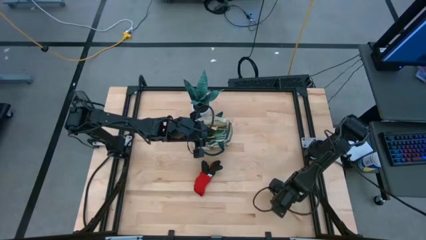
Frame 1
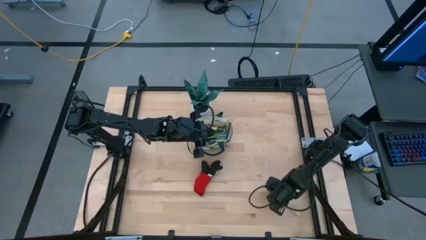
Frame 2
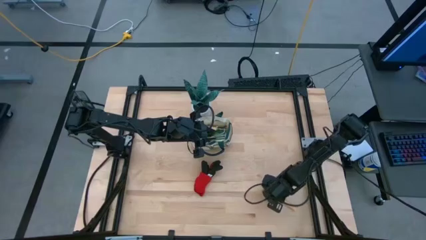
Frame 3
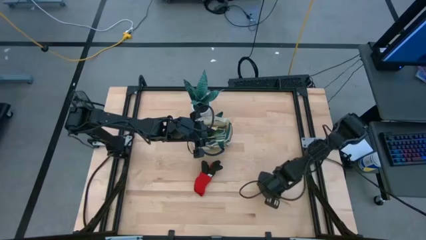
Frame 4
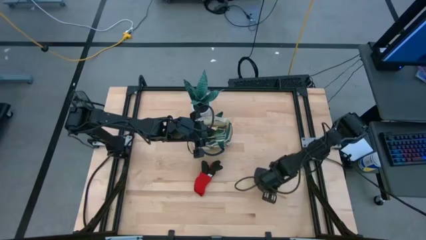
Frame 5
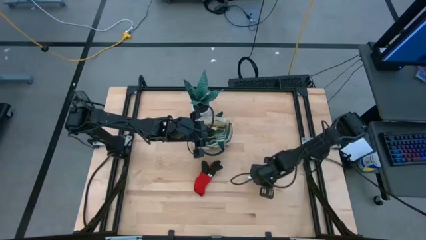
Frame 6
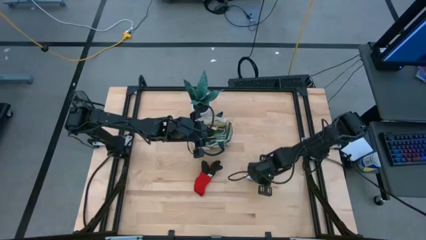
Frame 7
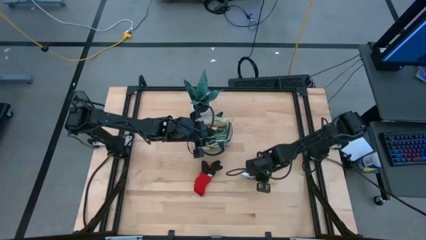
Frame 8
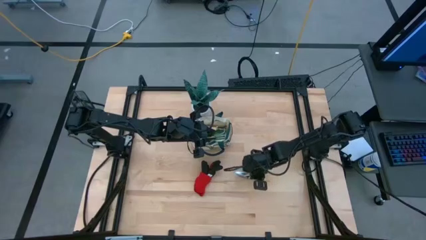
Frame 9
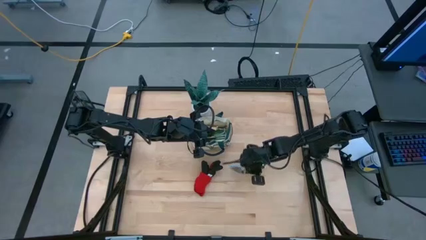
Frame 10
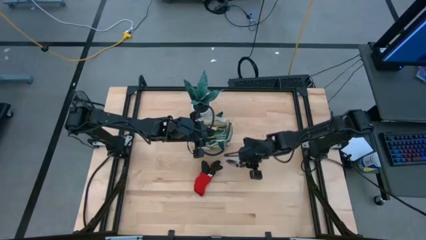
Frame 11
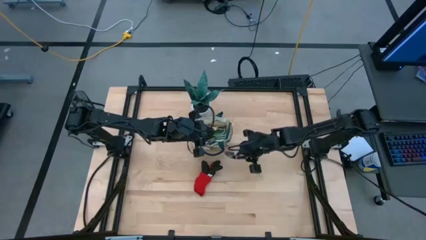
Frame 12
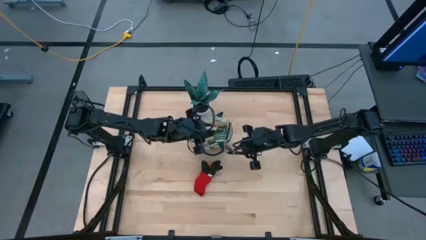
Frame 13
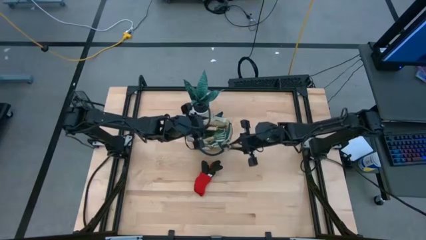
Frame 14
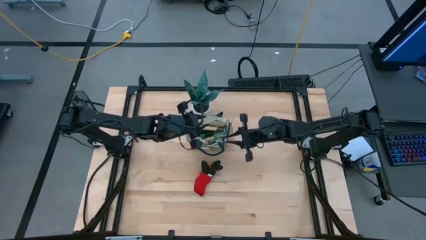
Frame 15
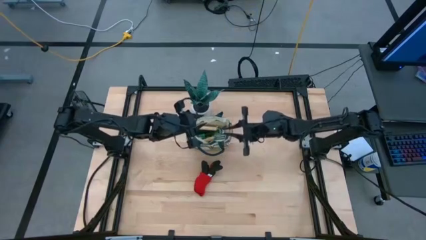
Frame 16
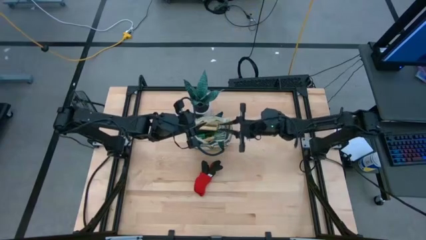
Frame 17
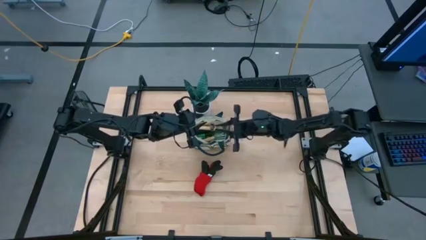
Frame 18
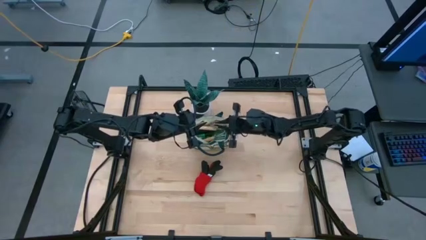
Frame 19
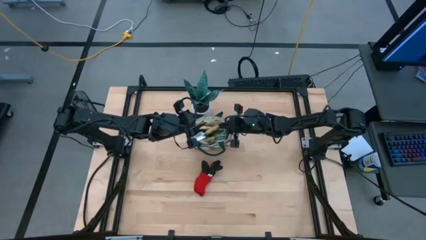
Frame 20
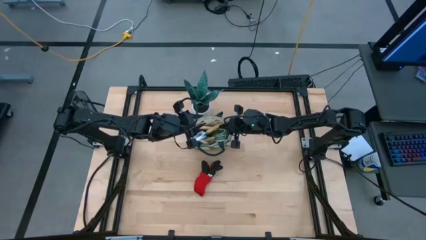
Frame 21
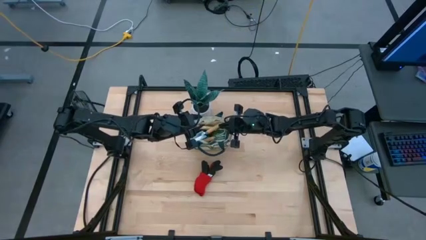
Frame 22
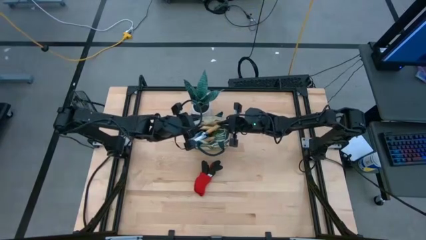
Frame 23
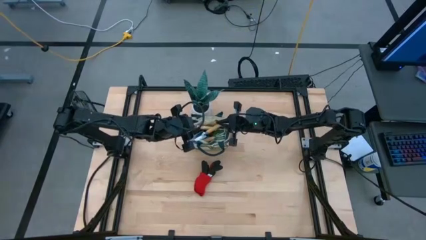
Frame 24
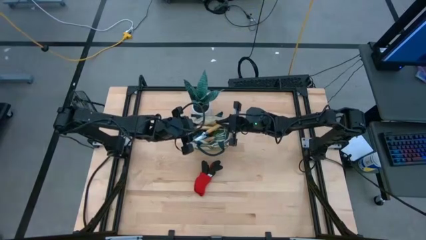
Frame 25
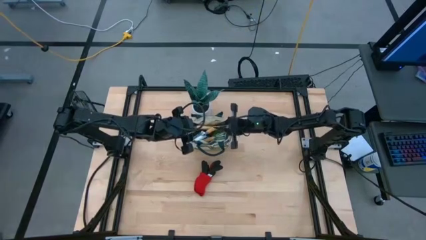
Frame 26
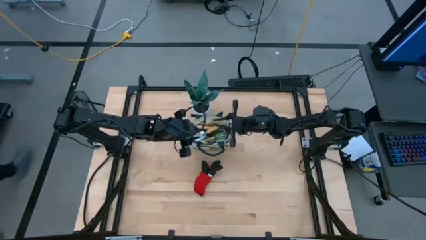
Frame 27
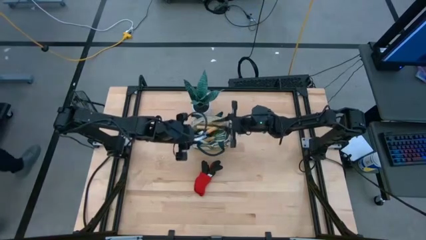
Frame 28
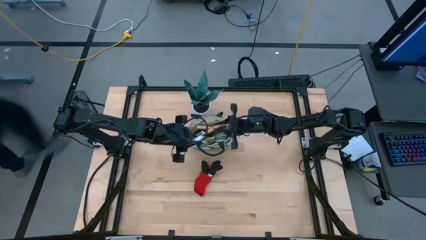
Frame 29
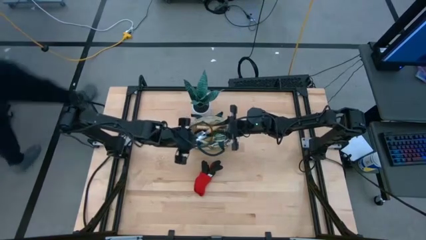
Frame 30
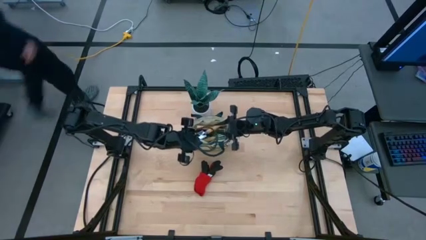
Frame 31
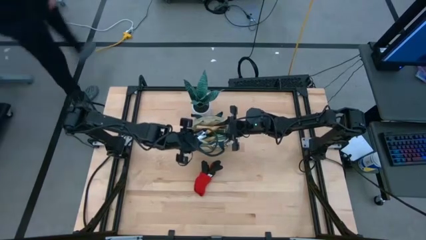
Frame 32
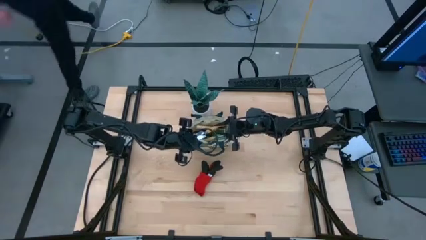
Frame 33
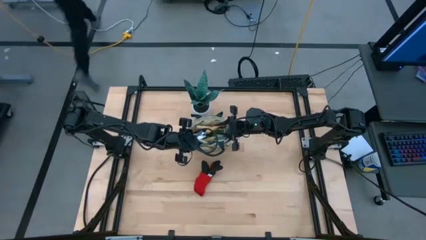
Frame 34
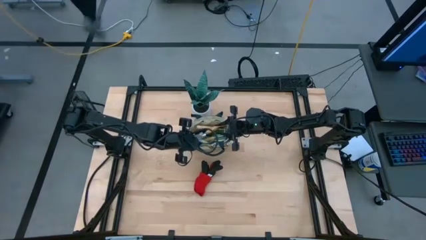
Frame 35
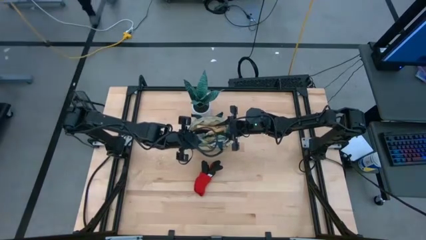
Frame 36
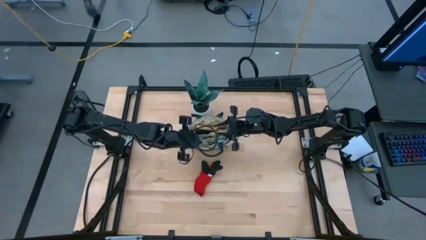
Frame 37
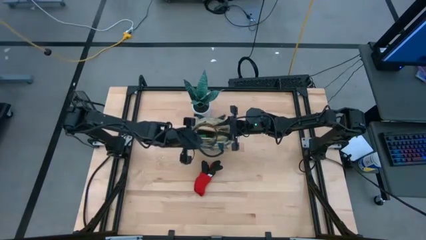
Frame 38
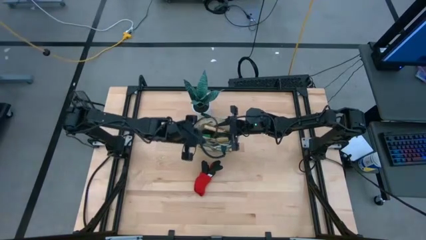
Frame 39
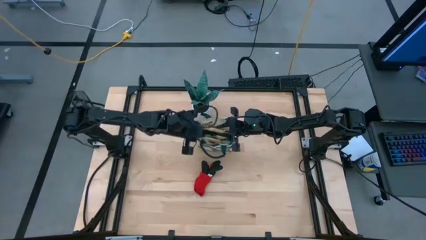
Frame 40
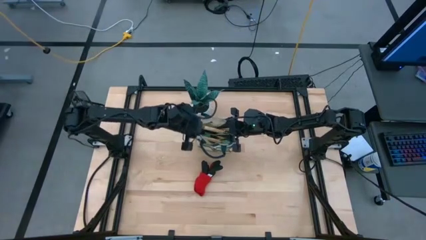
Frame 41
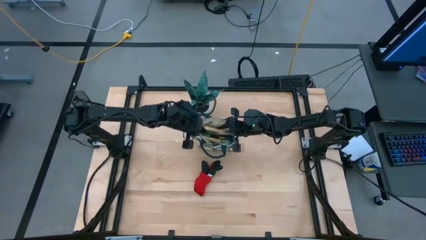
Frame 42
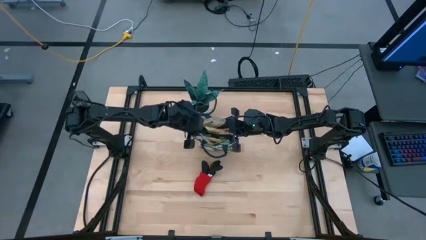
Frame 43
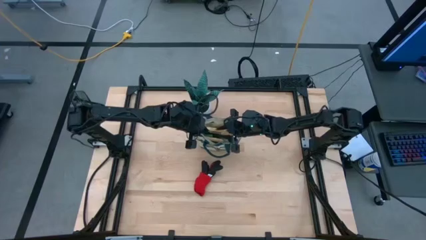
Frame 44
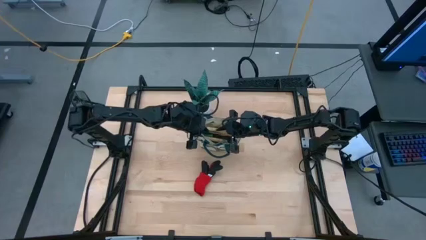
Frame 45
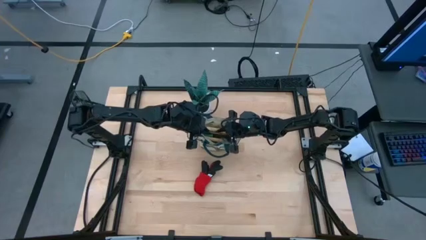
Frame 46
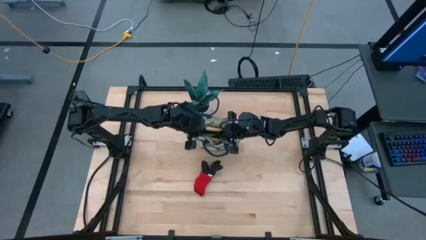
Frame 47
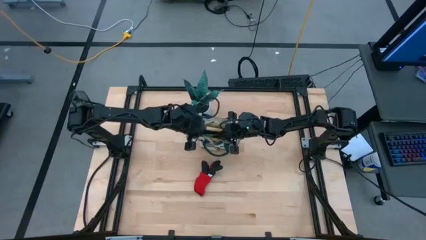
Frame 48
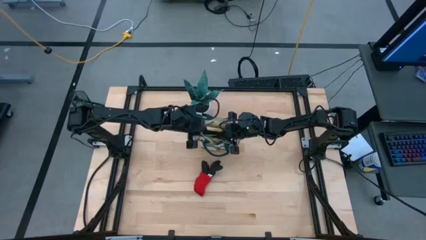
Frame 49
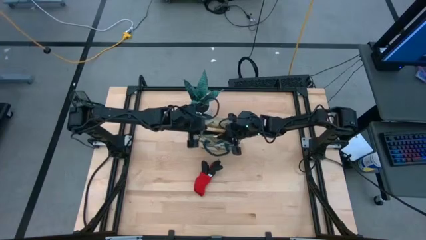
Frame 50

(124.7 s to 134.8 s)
Task: Pick & Place Garden tools in Gardening bag
Put the brown trowel into the gardening bag

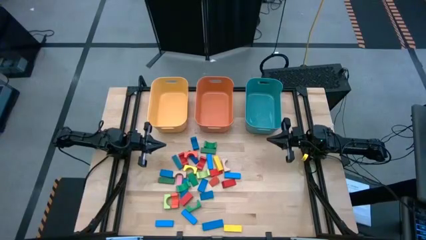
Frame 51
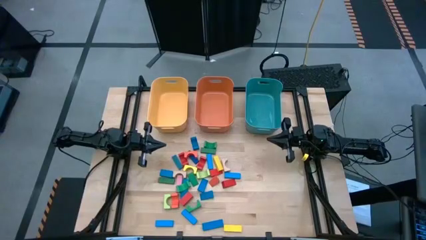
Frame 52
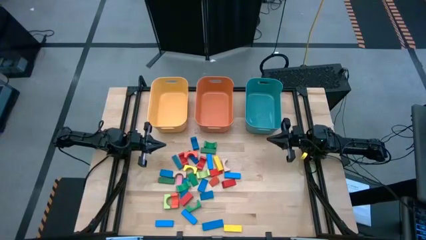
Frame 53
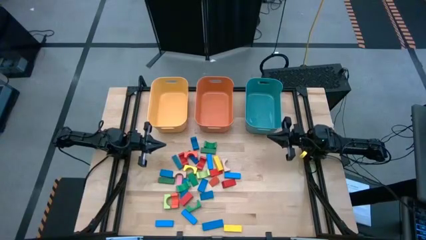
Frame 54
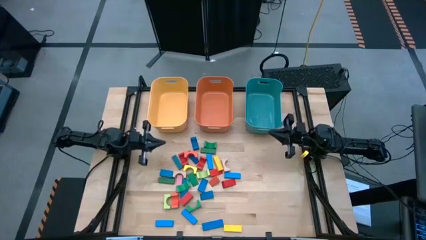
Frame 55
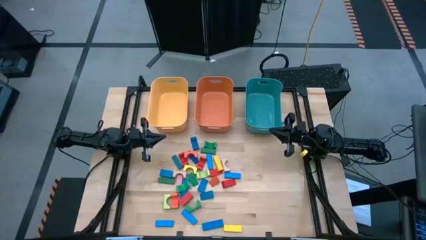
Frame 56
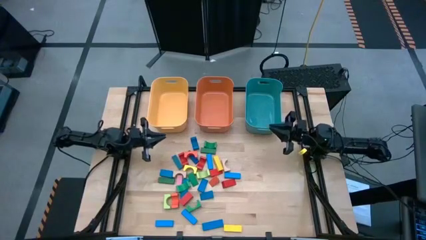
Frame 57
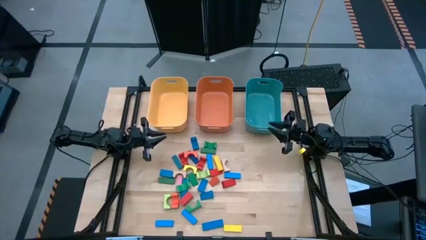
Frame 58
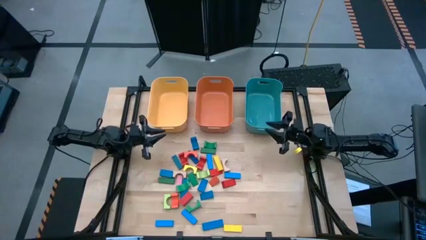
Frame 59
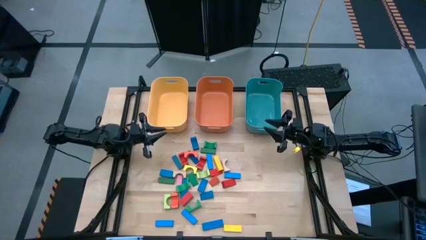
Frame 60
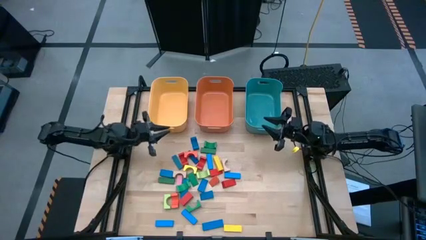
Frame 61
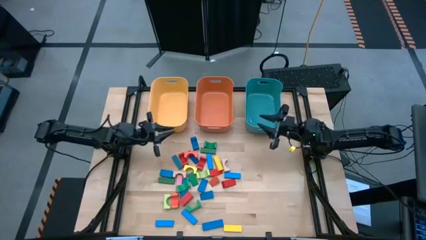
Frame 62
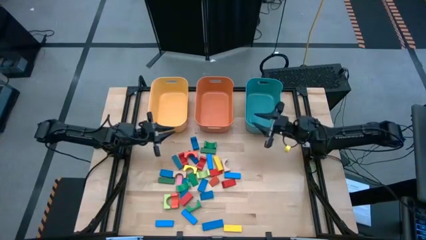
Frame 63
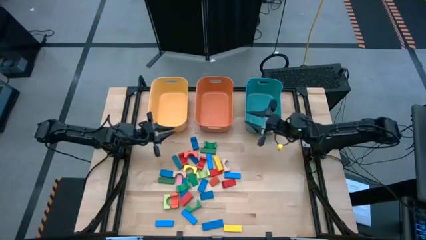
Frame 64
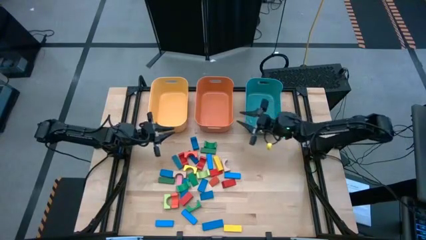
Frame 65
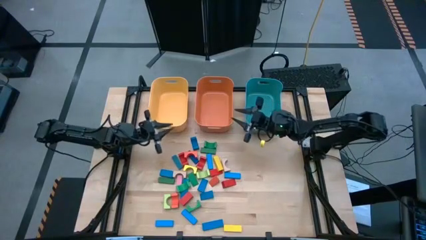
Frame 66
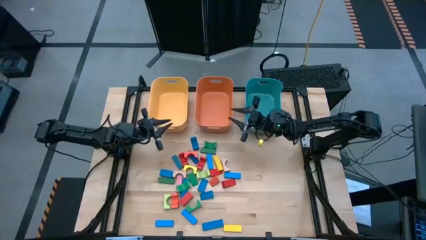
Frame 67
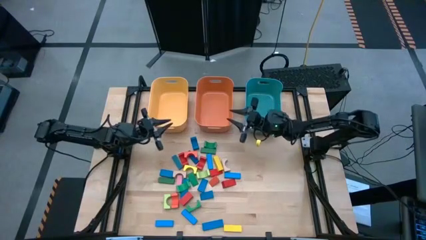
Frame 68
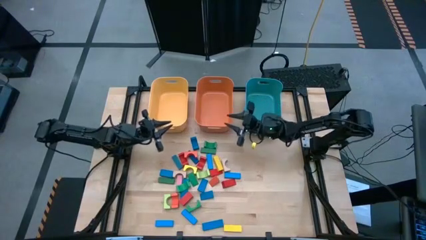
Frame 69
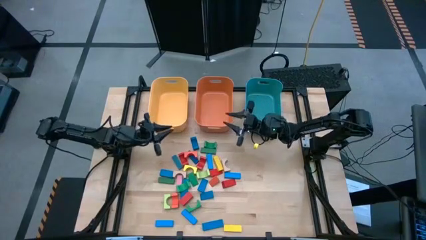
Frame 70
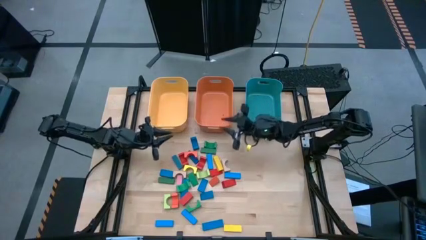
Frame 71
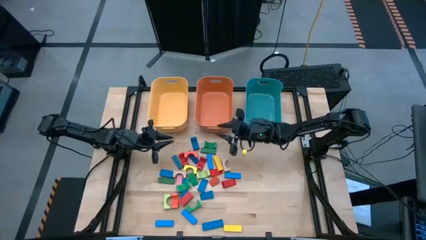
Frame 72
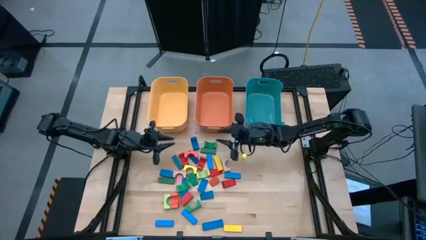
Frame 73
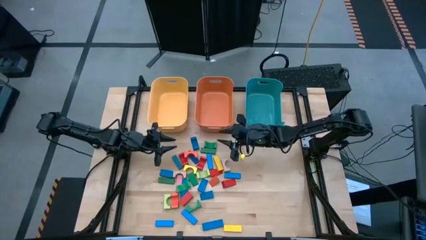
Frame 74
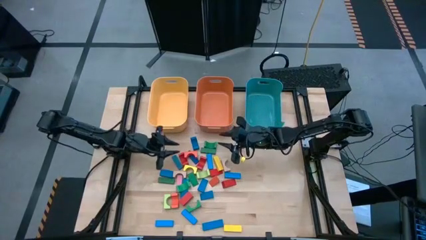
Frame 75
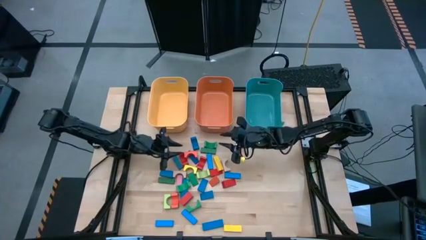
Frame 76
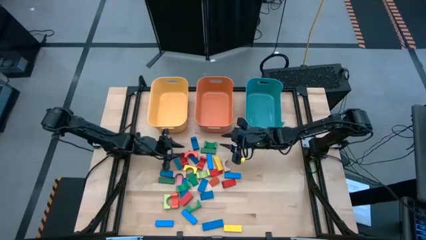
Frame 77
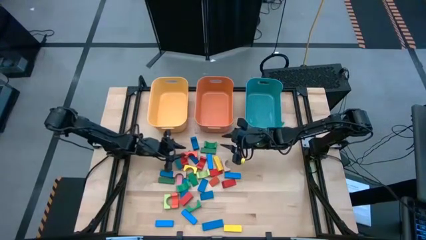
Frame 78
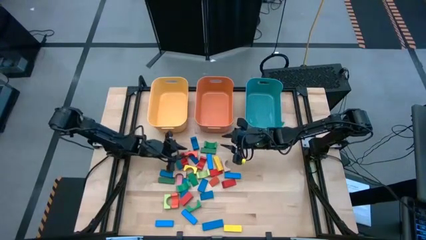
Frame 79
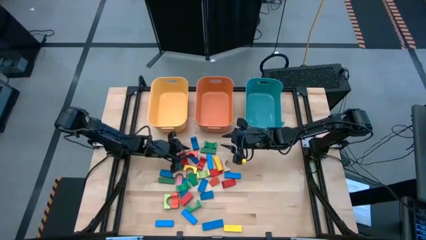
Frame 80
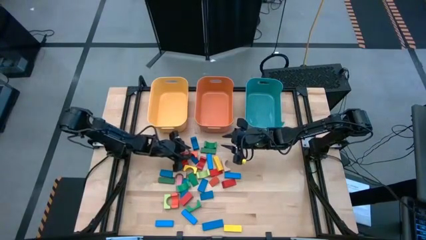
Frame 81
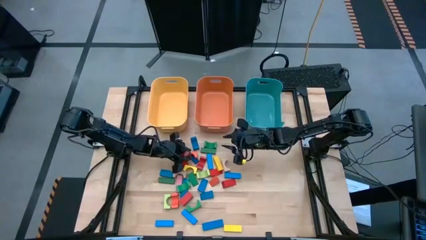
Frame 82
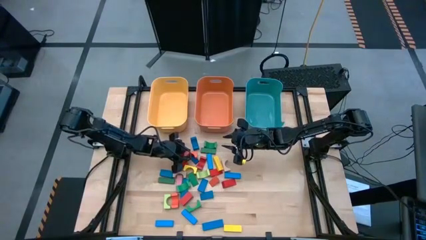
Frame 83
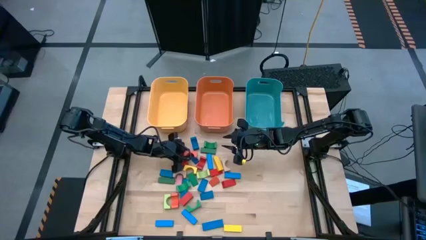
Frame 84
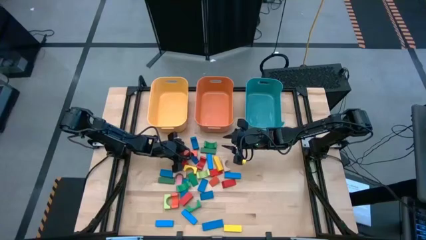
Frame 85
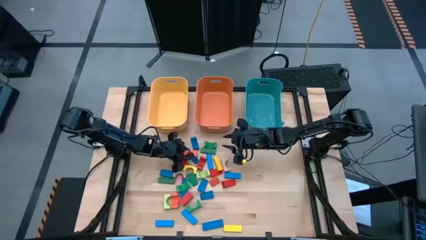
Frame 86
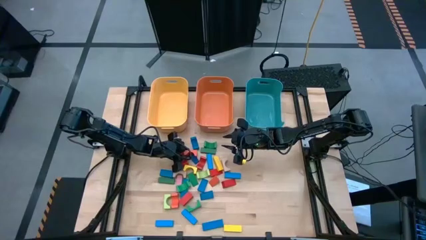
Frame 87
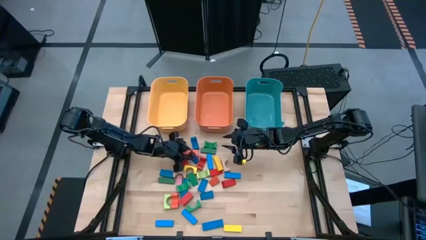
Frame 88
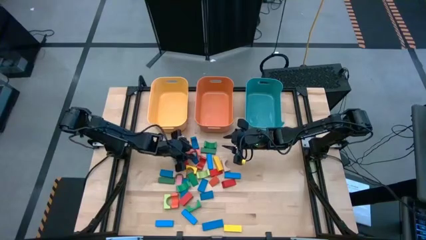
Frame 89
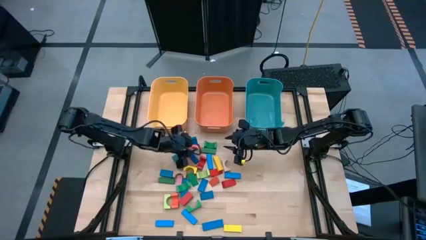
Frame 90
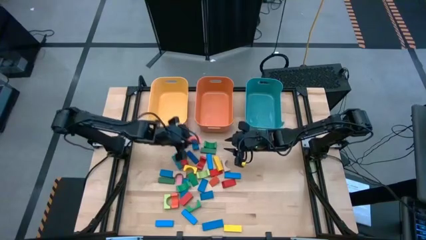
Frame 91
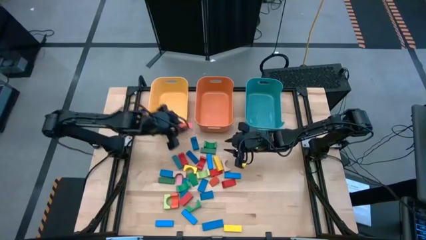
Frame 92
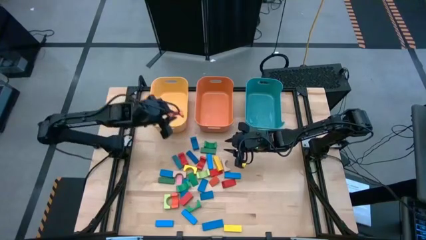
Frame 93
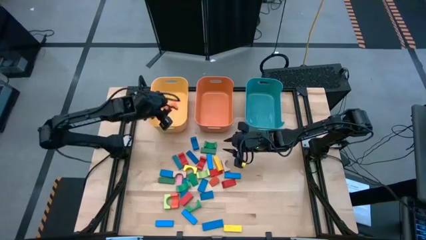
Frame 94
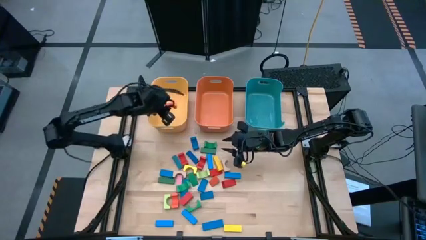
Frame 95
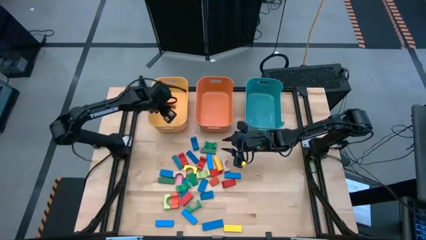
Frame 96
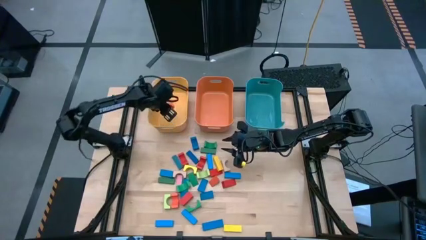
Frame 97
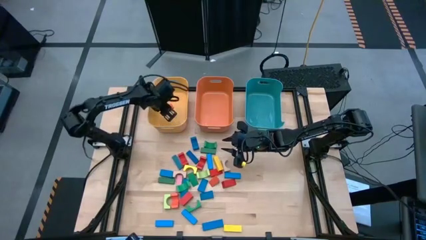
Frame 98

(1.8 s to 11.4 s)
Task: Sort blocks by size
Put the orange arch block into the yellow bin
